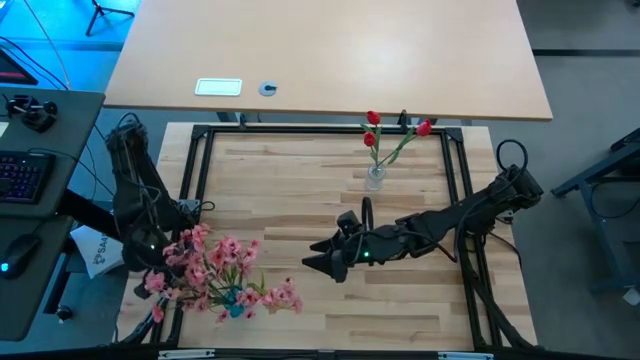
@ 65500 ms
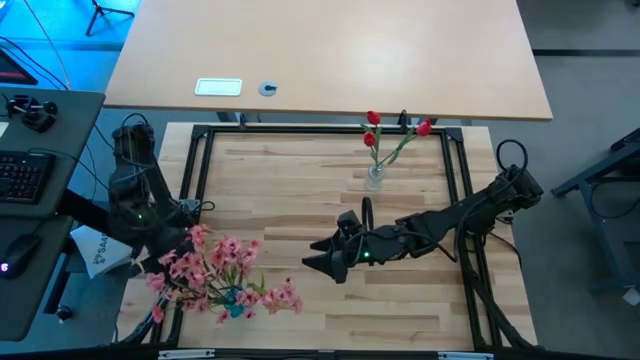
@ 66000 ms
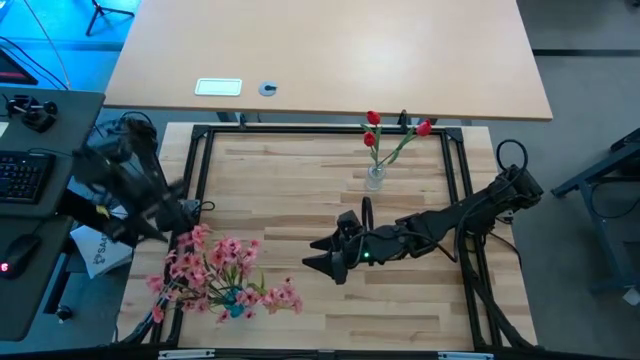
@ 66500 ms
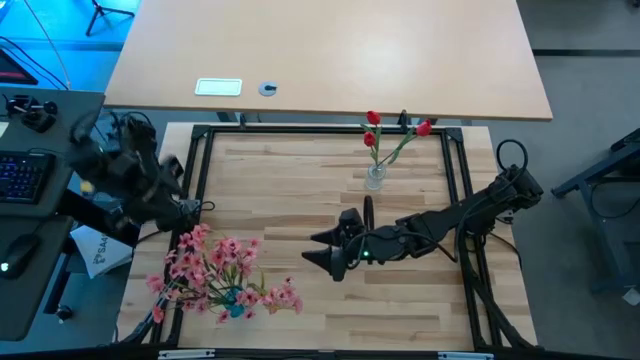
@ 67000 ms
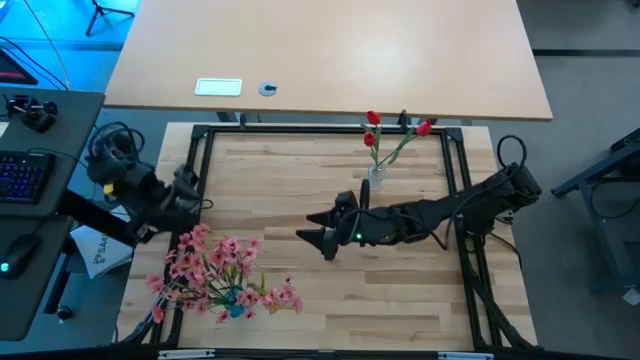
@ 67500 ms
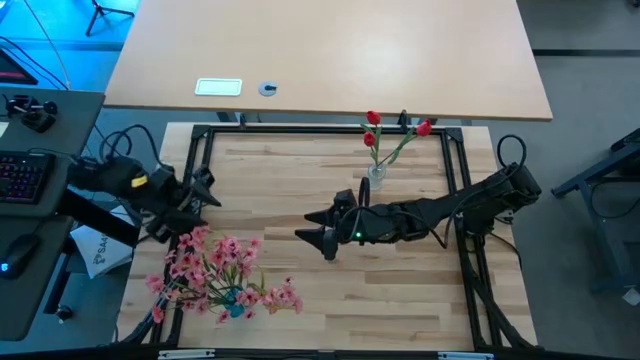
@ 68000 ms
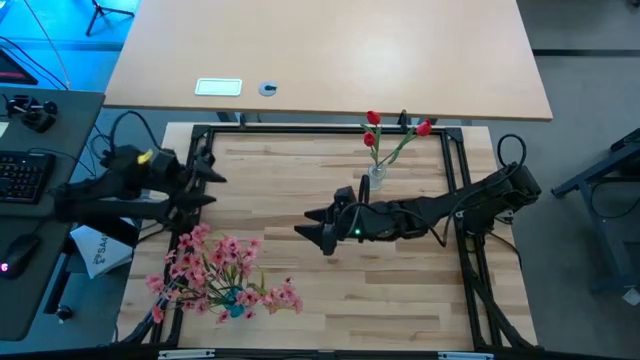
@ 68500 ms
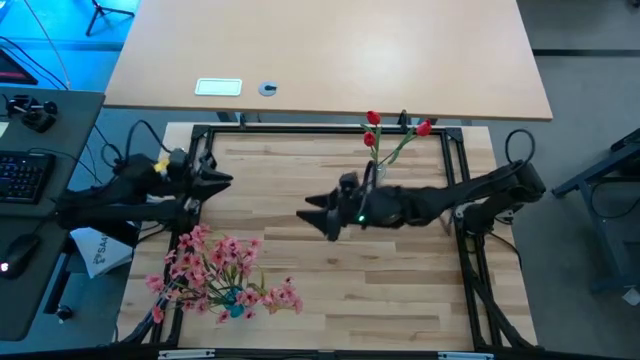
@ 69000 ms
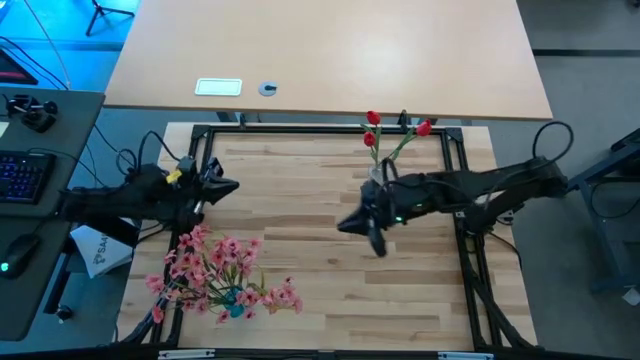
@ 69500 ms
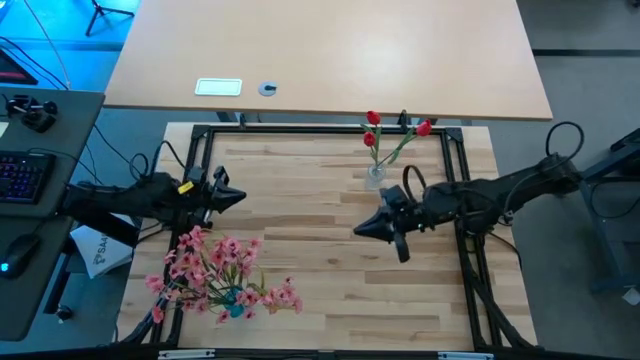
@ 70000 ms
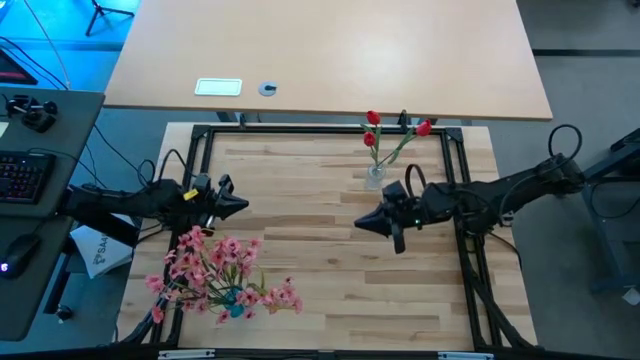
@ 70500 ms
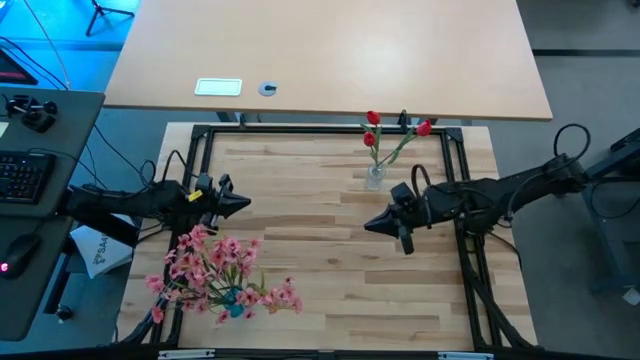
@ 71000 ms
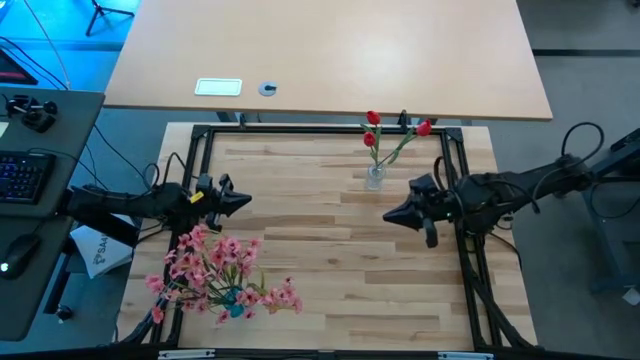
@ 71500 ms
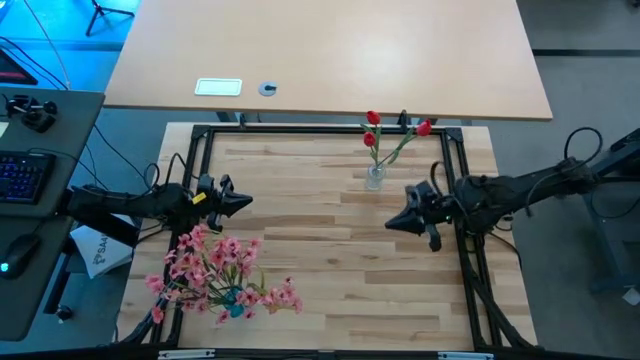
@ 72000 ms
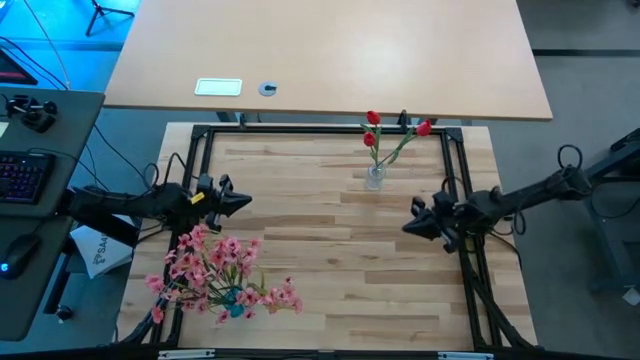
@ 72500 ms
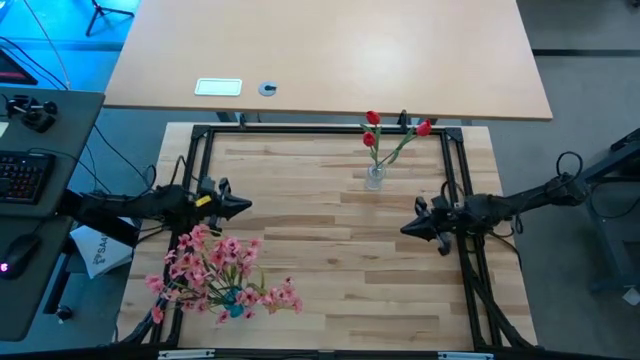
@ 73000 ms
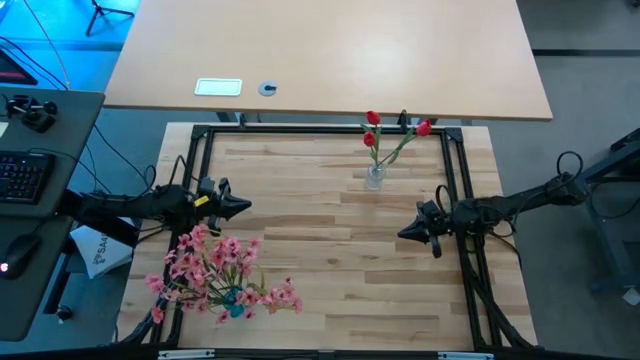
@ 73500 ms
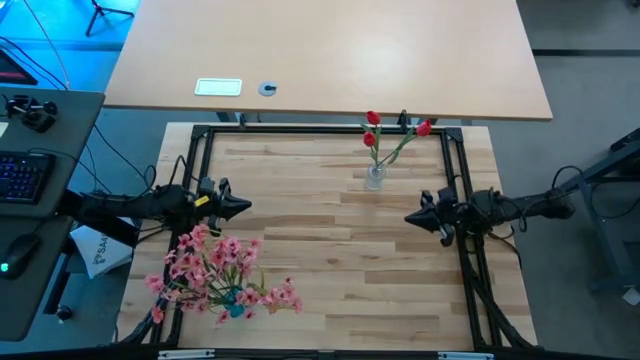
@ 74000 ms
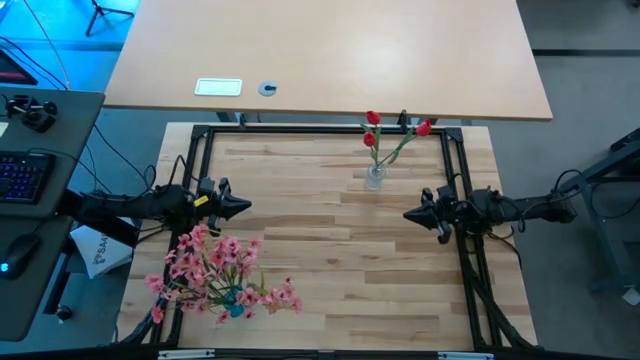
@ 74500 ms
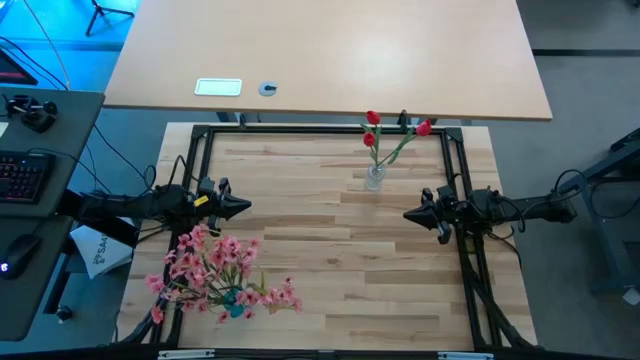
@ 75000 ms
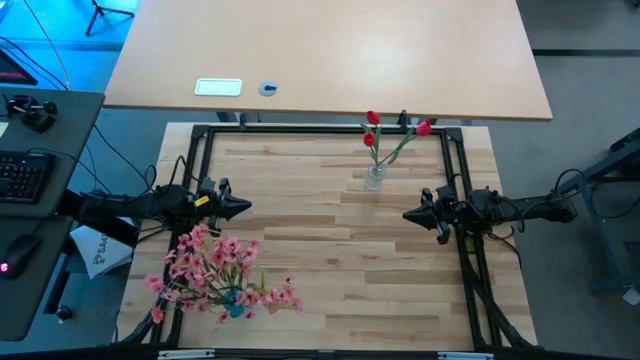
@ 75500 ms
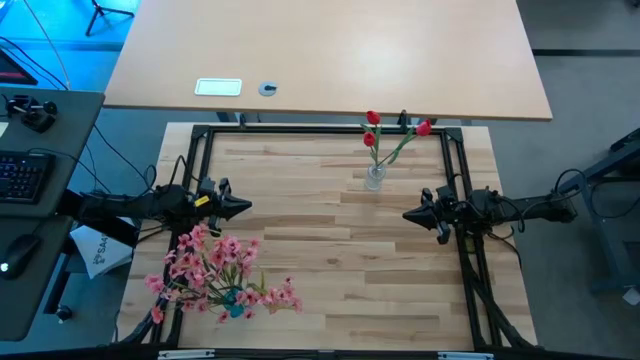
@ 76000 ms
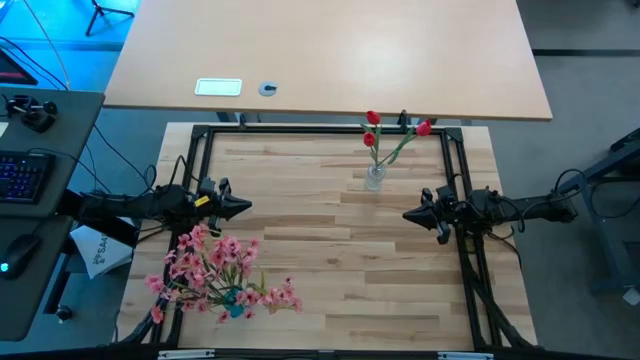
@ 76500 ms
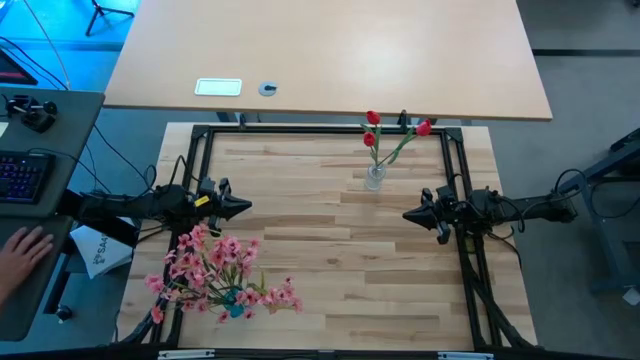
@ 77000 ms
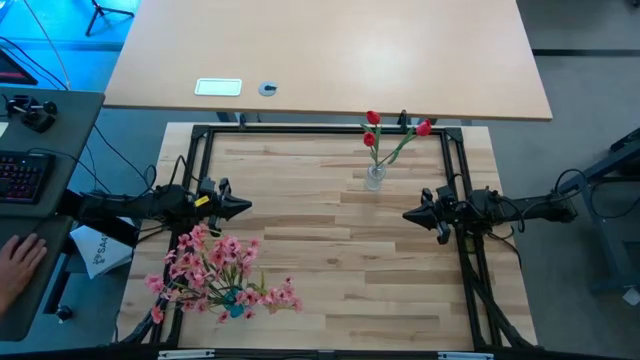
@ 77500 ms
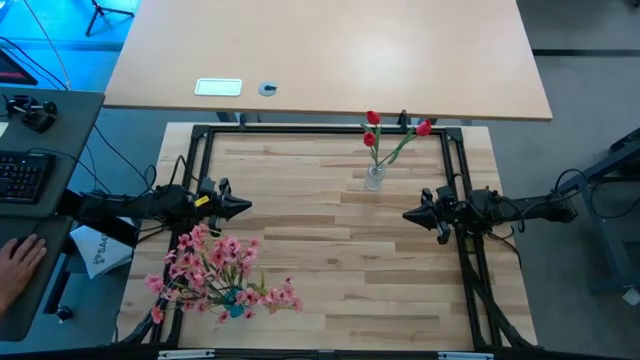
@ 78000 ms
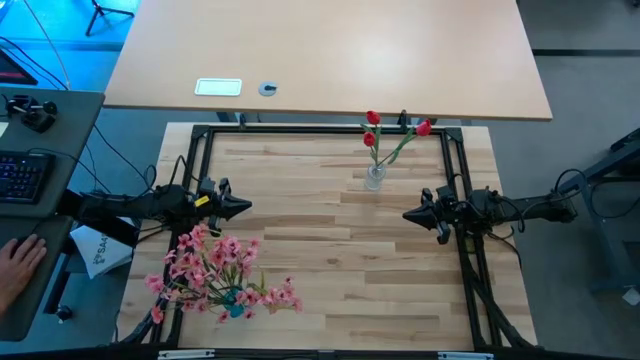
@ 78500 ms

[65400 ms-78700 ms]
Task: Sort flowers into vase by color
Return to Home Position

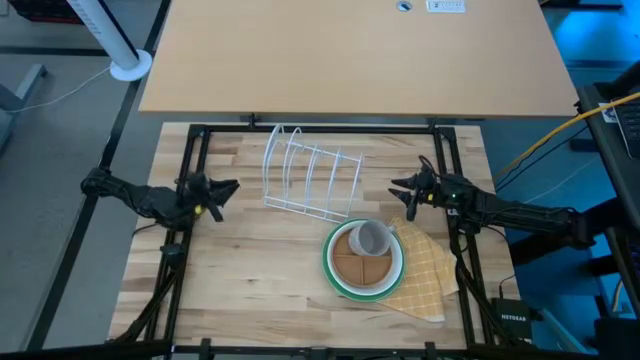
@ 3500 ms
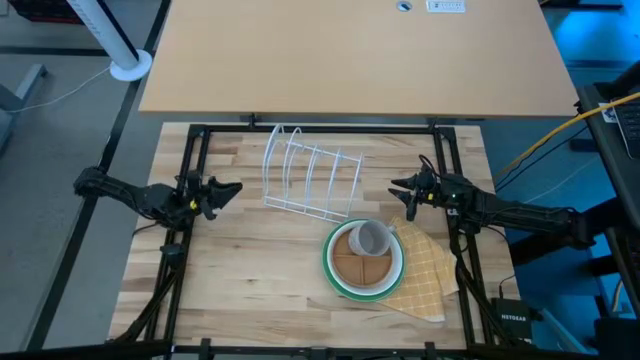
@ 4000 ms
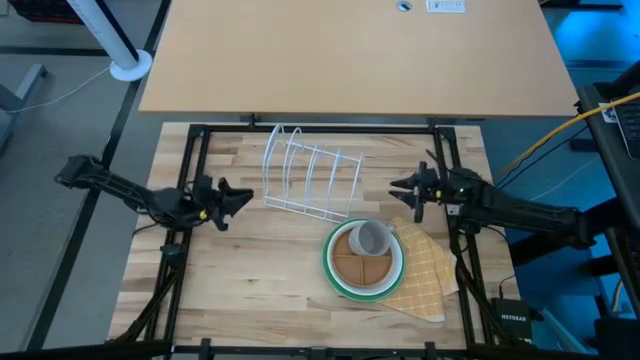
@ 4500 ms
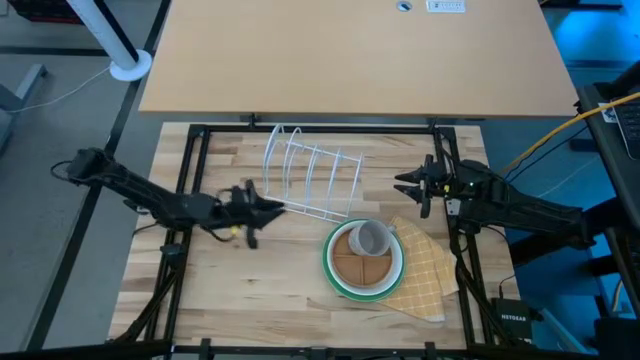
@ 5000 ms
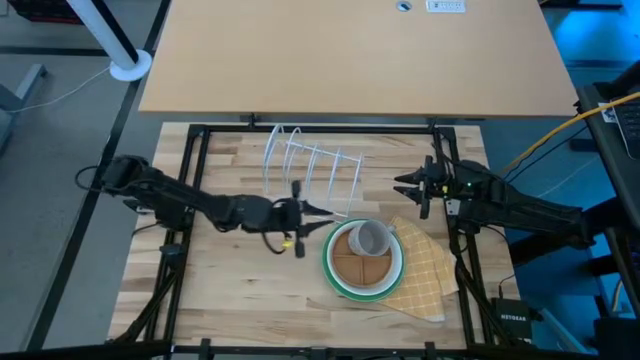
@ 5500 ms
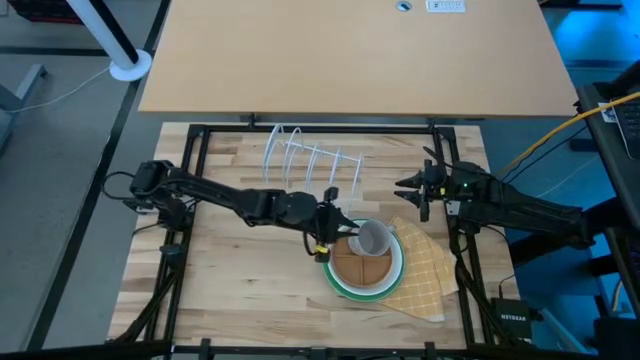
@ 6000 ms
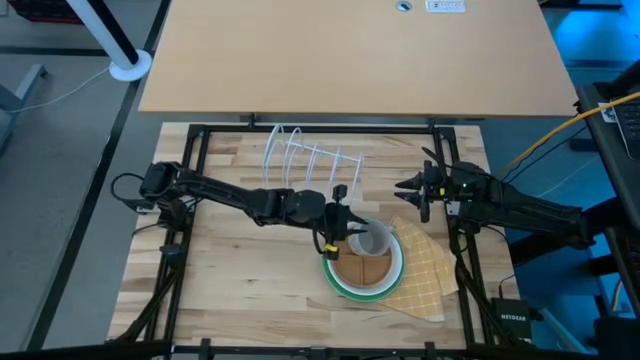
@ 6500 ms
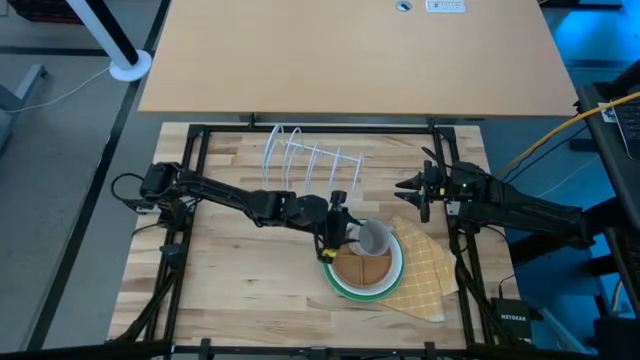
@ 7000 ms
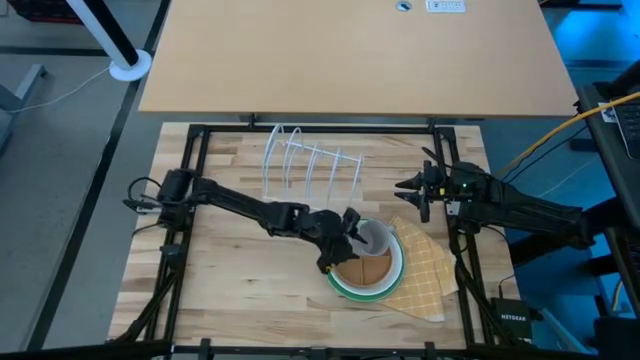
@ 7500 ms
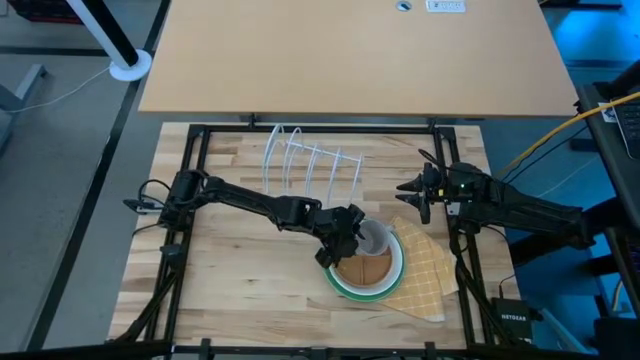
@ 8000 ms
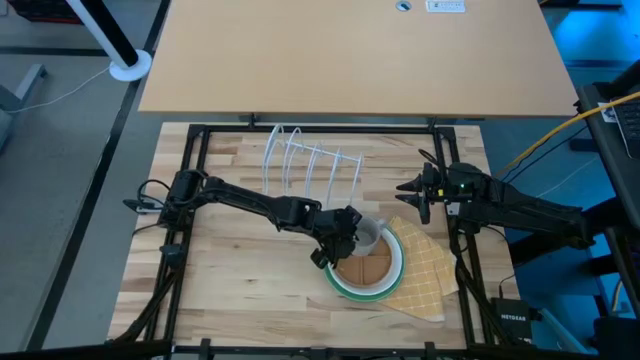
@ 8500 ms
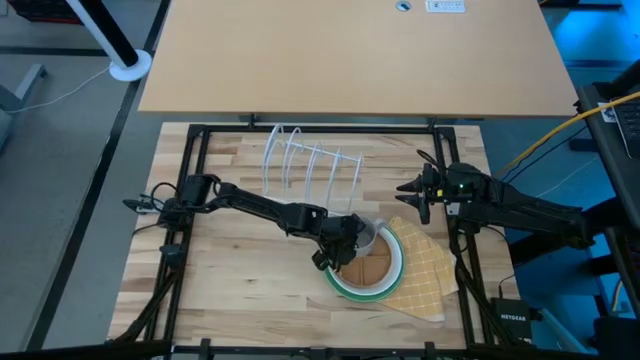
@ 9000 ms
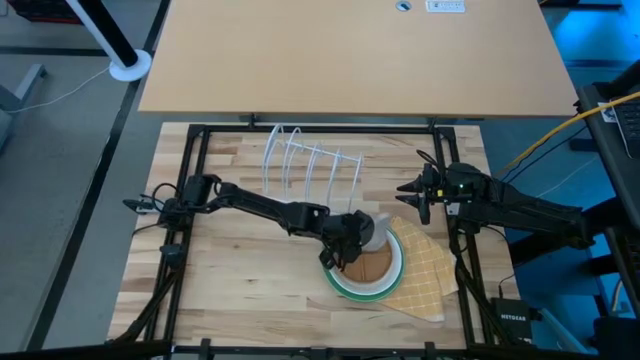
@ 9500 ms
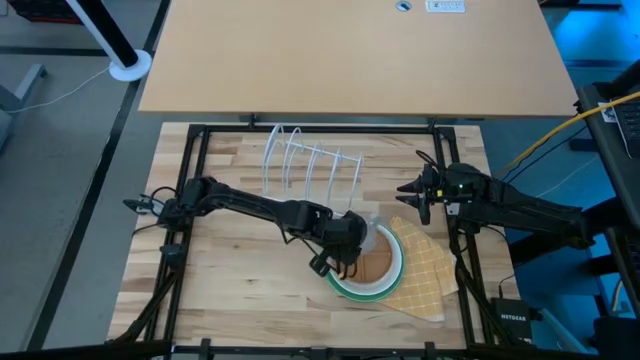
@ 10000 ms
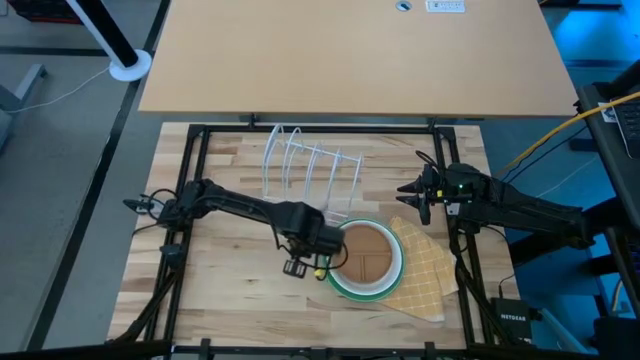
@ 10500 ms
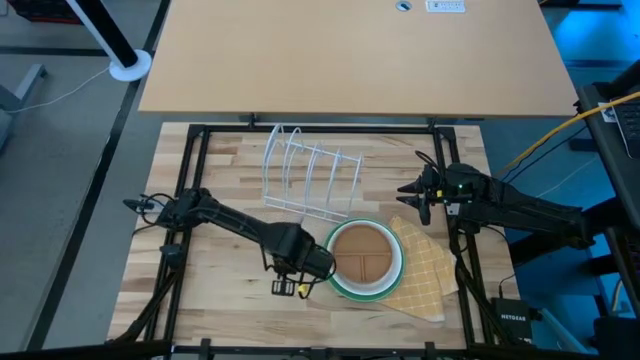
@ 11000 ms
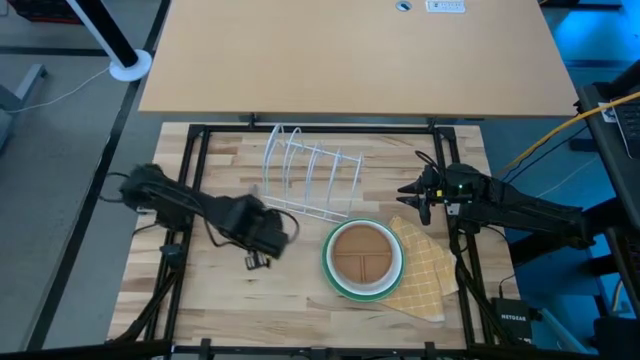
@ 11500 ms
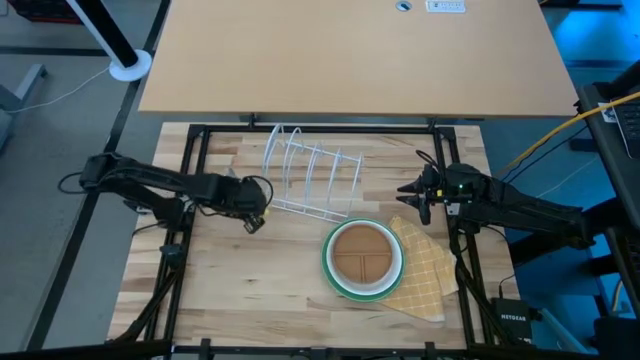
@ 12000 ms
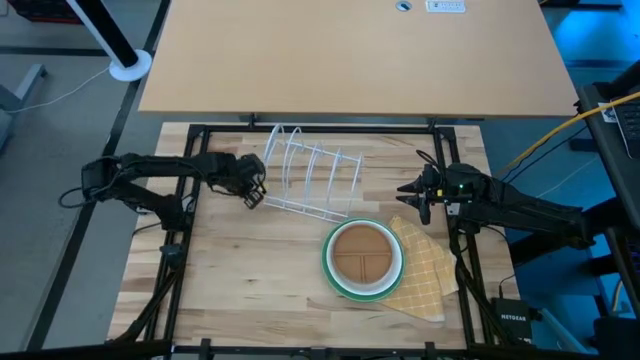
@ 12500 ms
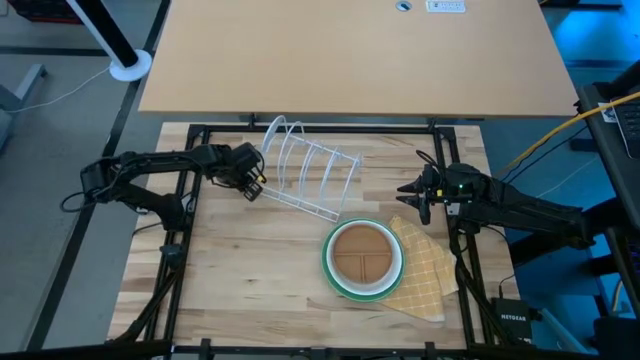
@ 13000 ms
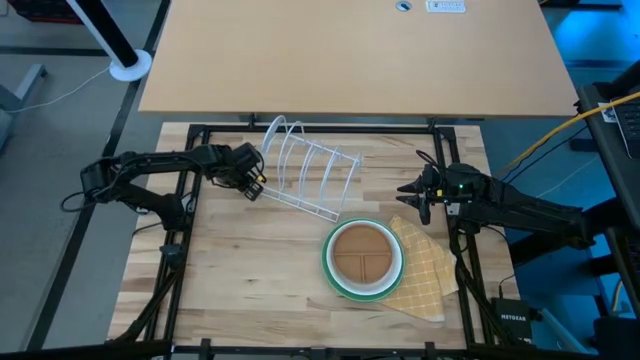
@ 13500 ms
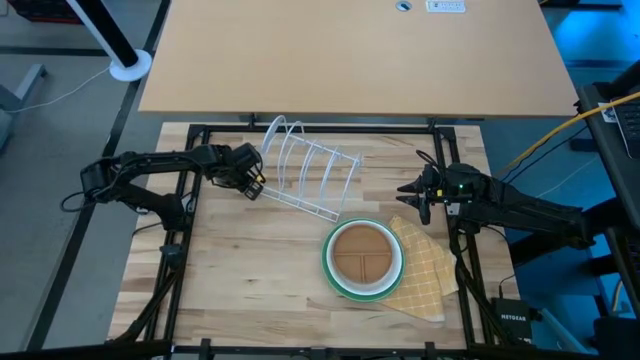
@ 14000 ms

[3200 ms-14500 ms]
Task: Sort dishes
Put the grey mug from the top of brown plate on the table
